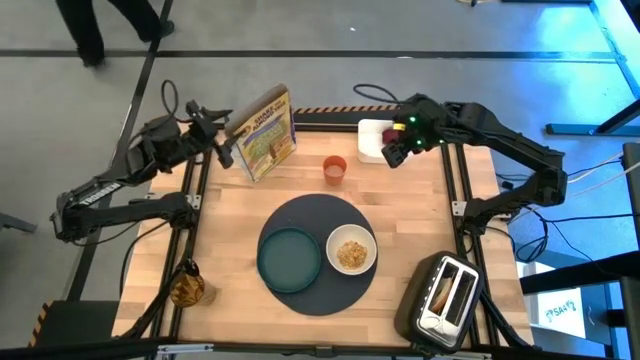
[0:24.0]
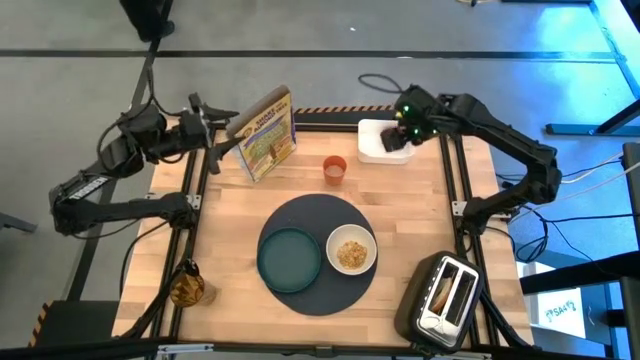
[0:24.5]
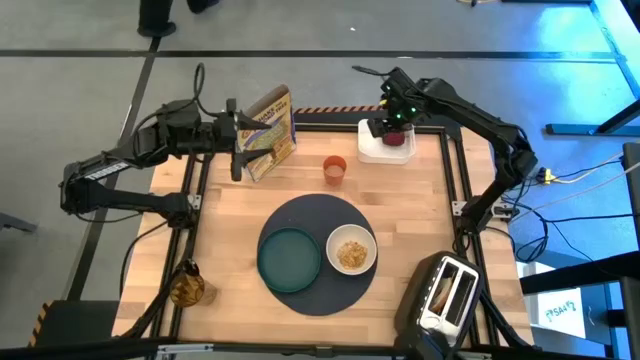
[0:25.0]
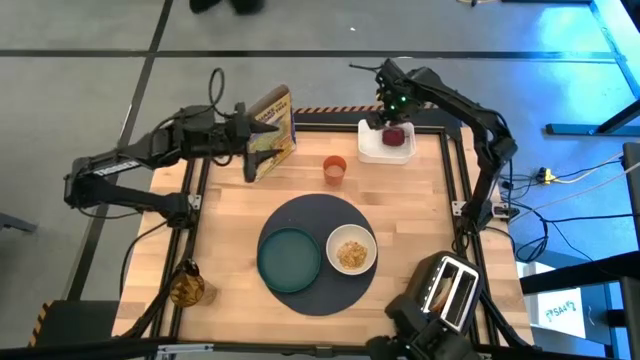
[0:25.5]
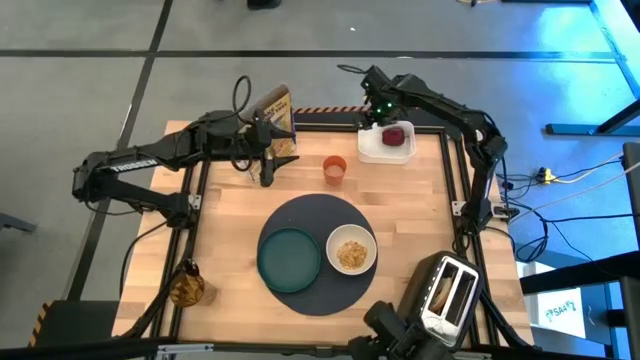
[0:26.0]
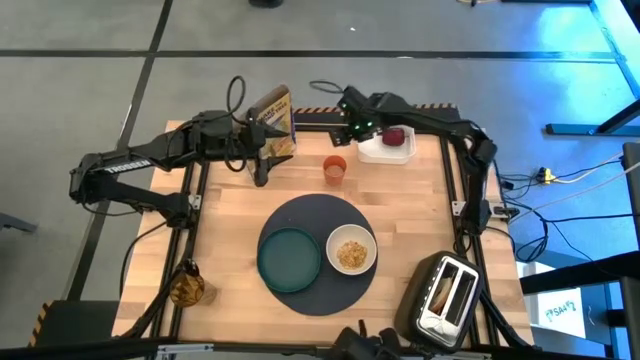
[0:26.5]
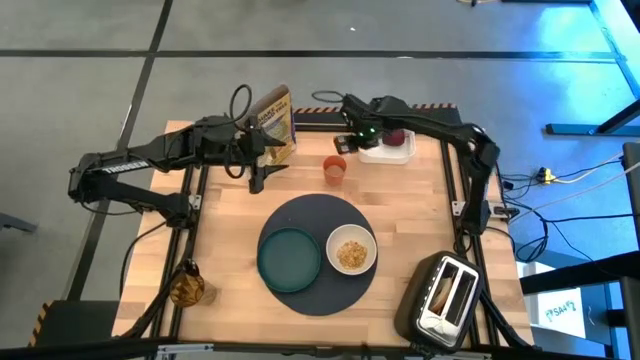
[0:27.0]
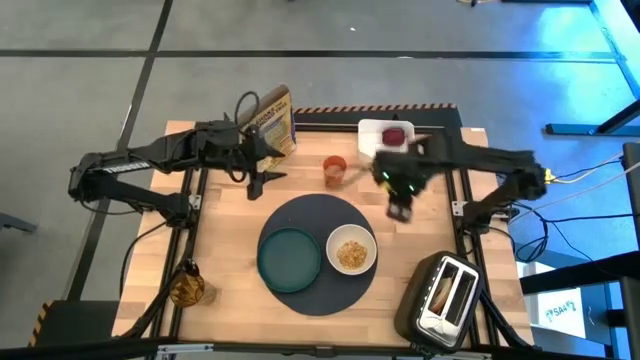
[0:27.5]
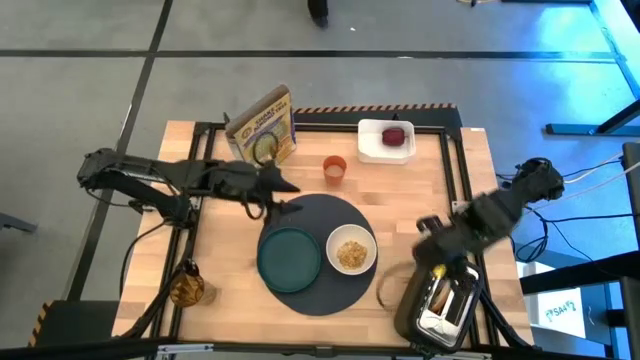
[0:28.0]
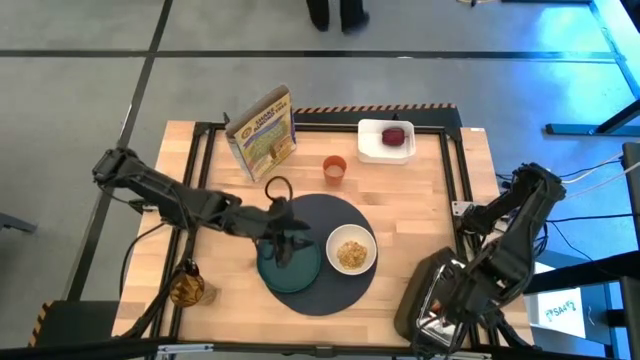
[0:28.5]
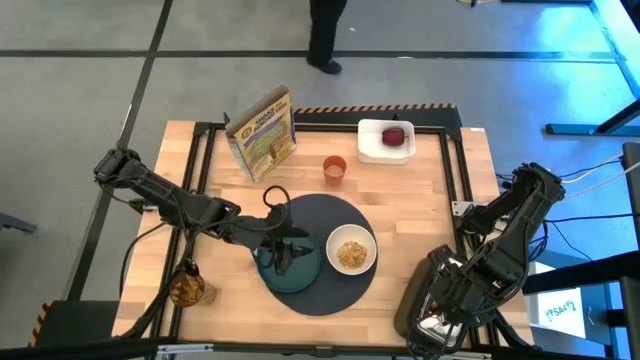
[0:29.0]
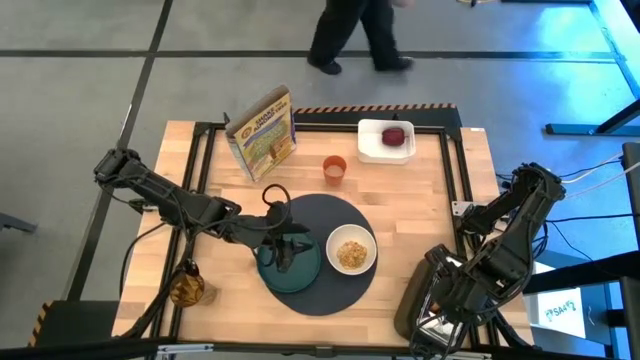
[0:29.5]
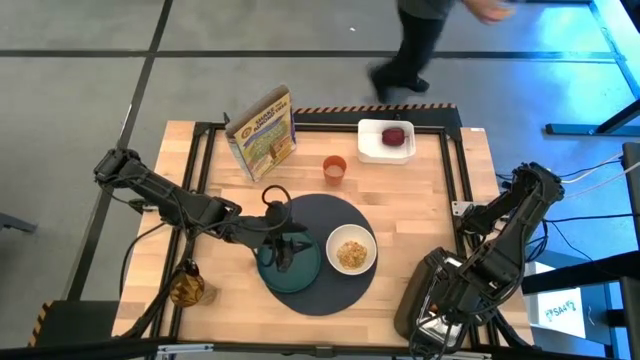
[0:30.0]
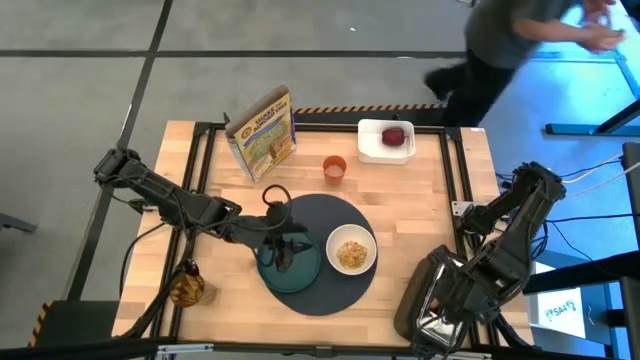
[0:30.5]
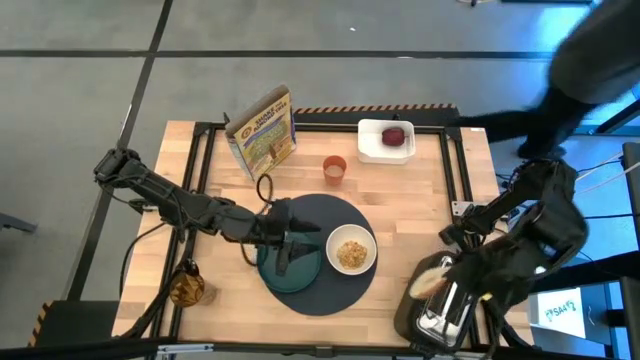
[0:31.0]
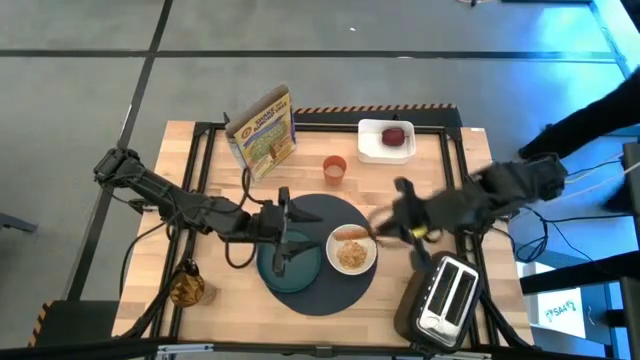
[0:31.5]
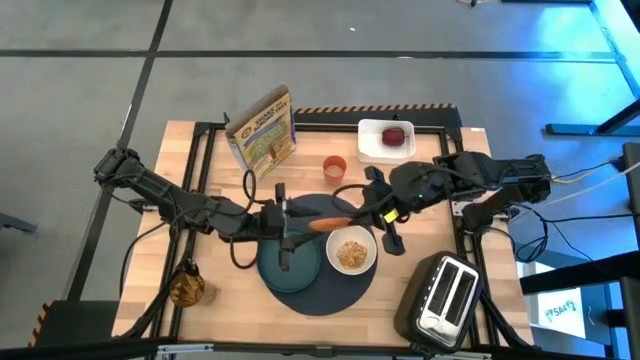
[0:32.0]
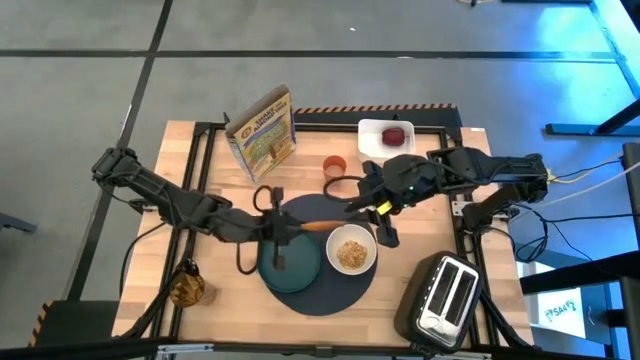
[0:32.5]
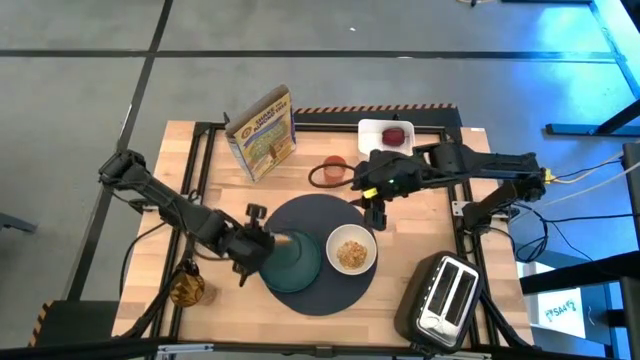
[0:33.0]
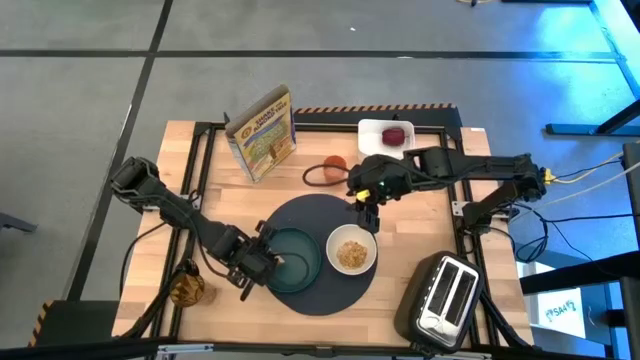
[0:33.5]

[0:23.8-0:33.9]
Task: Arrange a breakfast setting
Put the brown toasted bread on the dark green plate

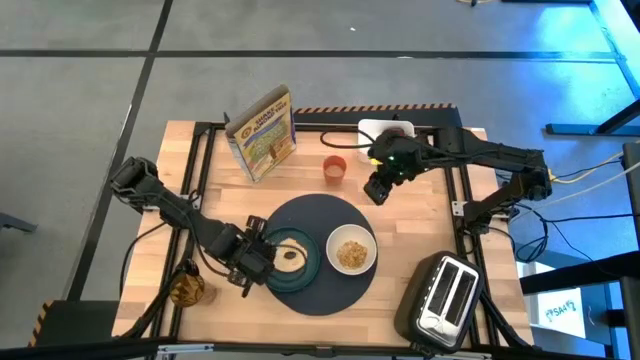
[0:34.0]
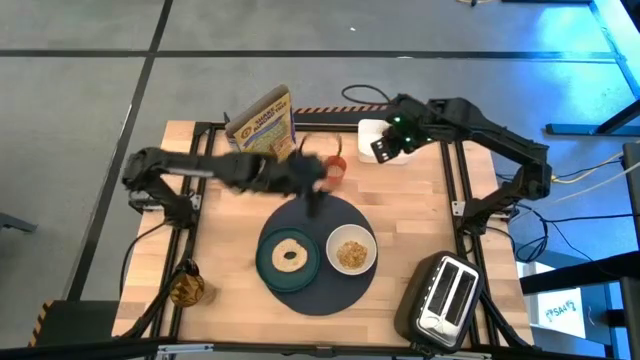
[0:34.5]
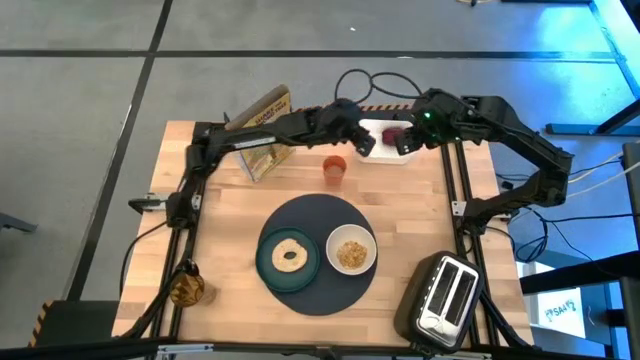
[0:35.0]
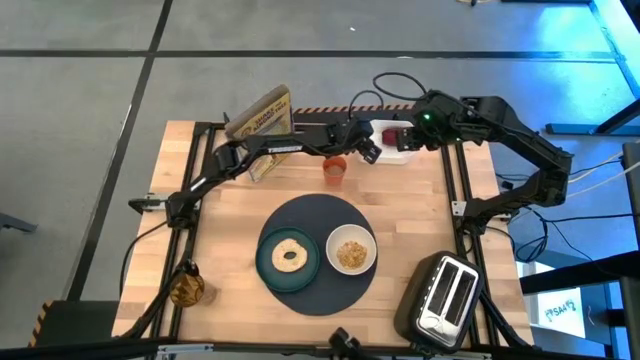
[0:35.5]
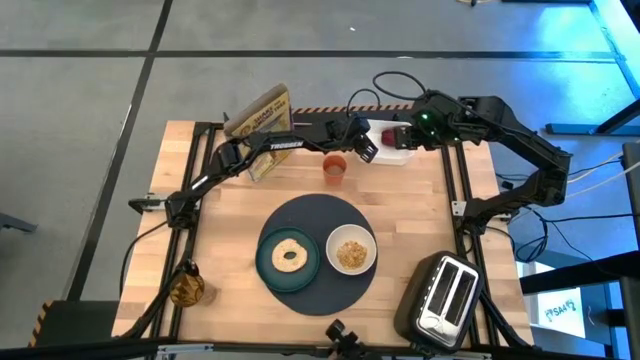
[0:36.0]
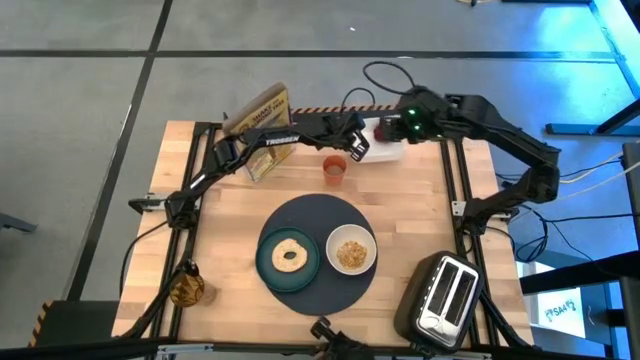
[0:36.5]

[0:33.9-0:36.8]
Adjust the white bin

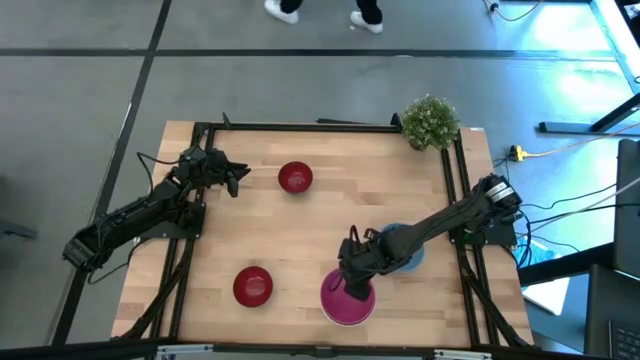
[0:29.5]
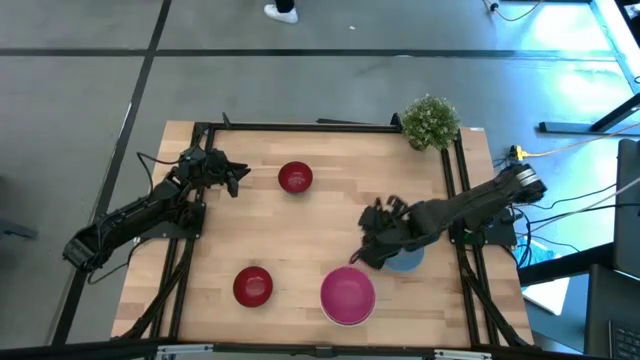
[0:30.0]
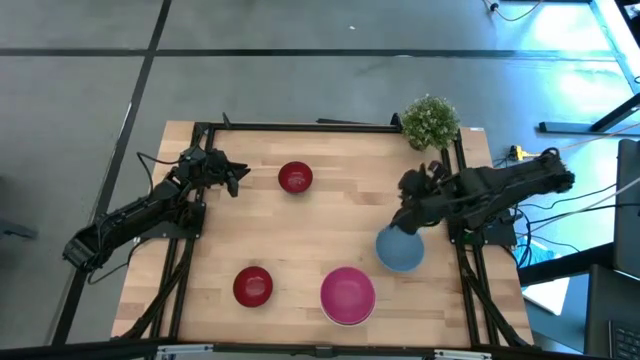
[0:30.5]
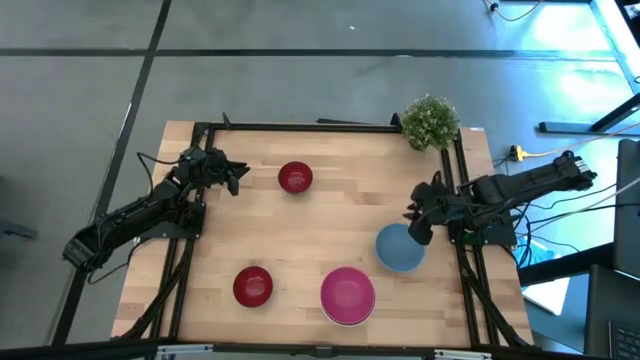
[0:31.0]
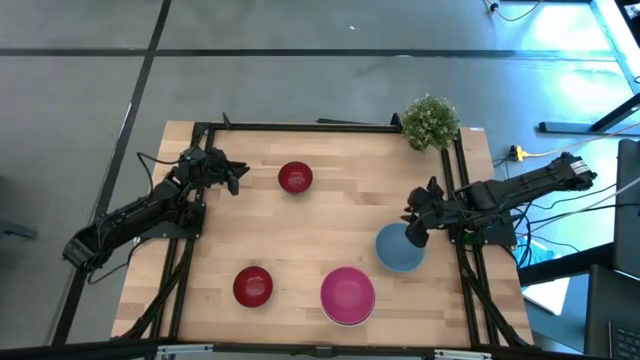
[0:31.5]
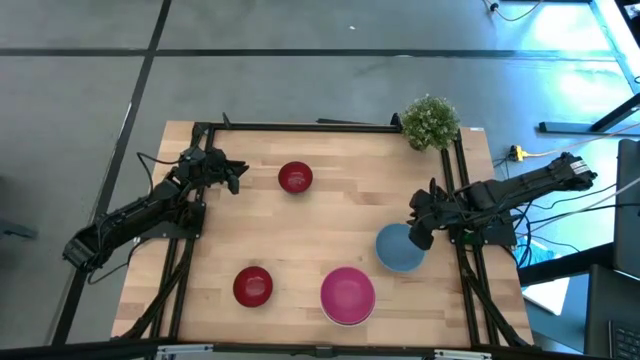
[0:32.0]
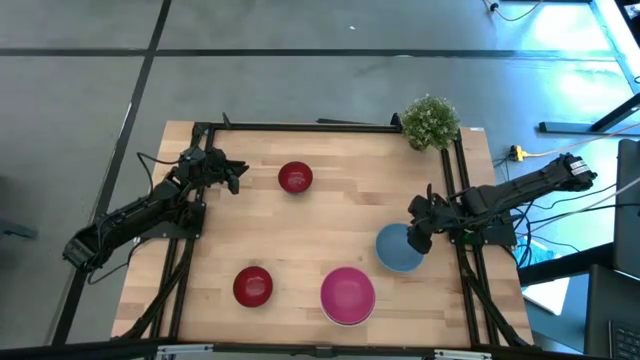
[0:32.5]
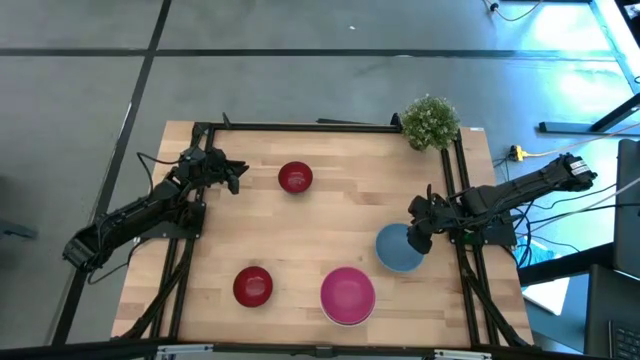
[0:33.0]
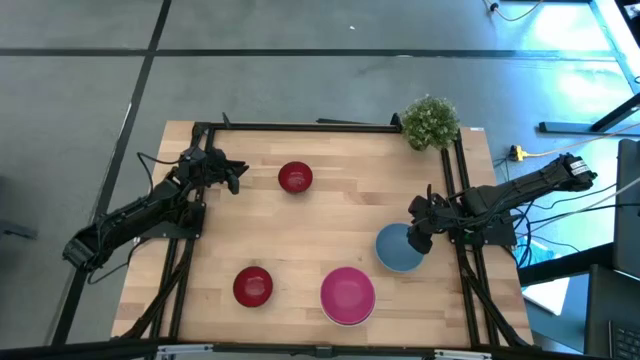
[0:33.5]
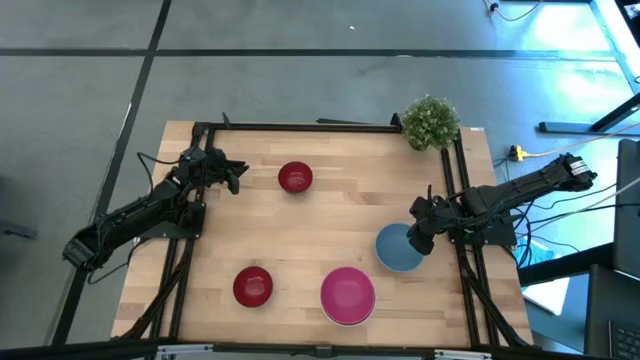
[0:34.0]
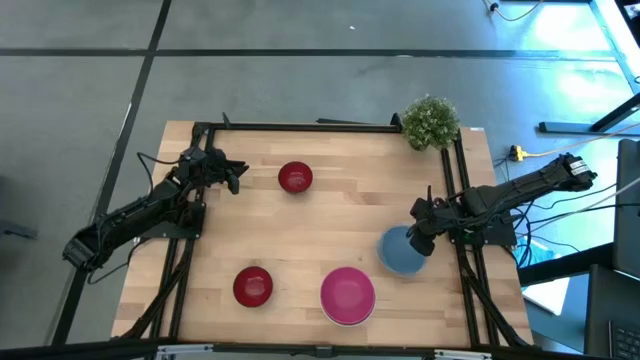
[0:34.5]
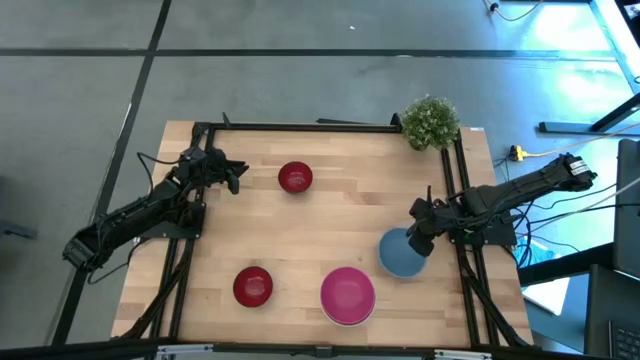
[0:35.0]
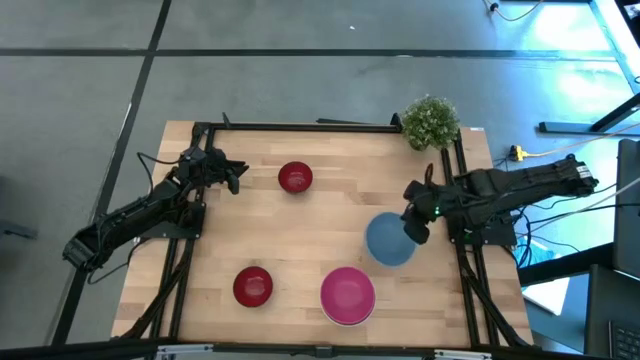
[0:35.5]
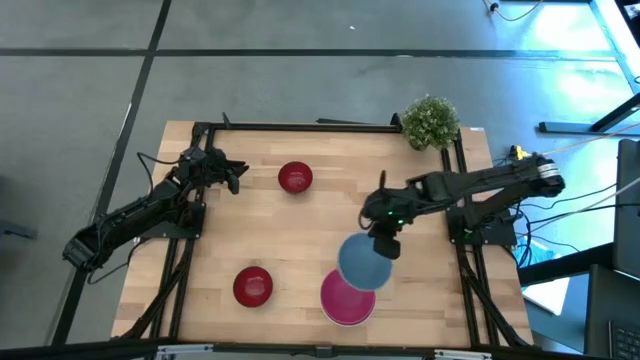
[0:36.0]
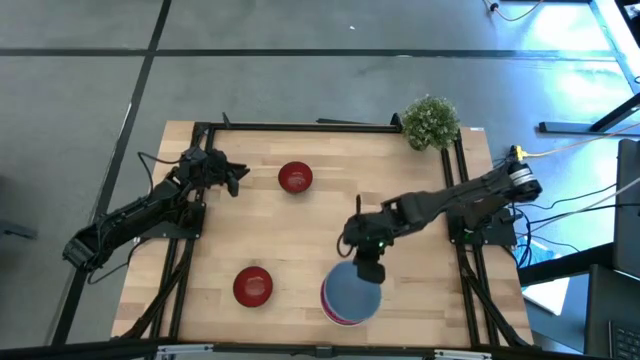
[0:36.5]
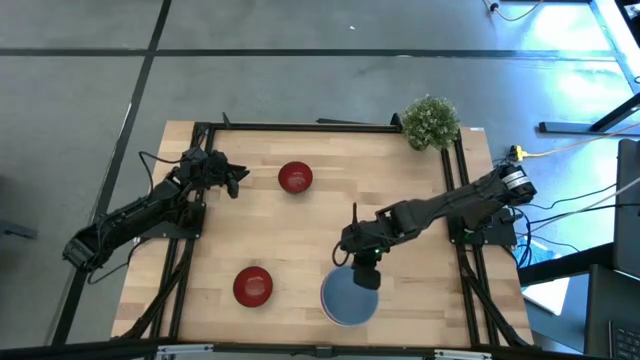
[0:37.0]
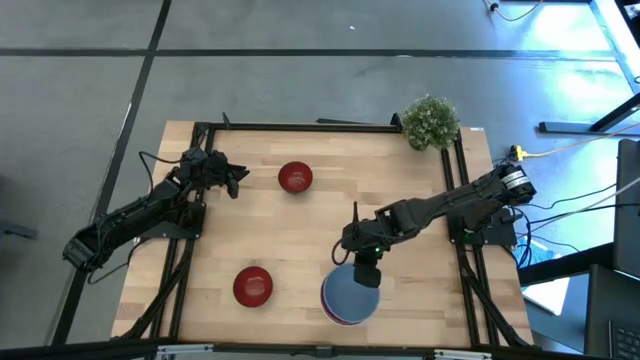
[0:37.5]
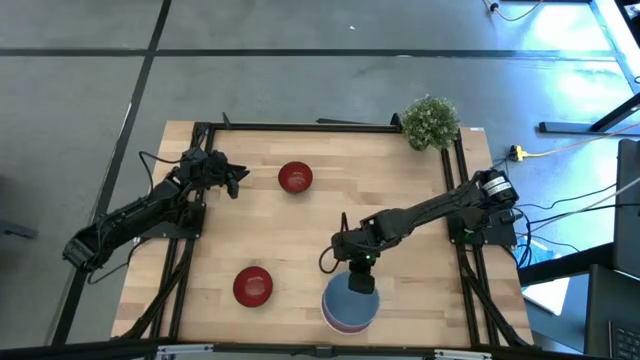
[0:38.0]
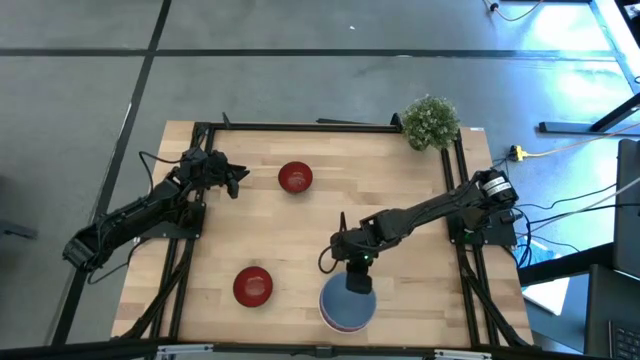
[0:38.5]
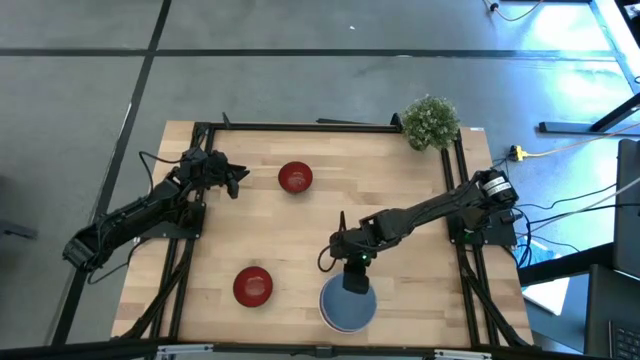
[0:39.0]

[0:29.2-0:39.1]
Task: Nest bowls inside each other
Stack the blue bowl on the pink bowl
